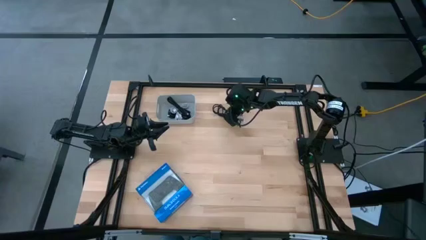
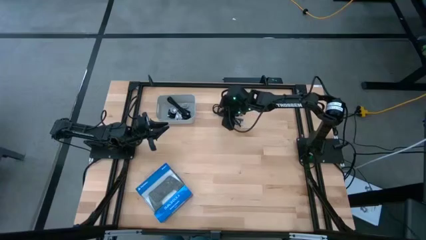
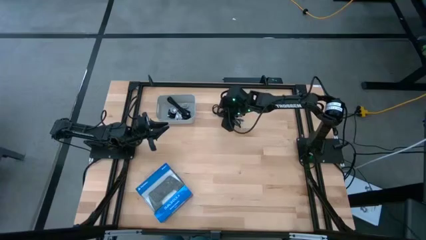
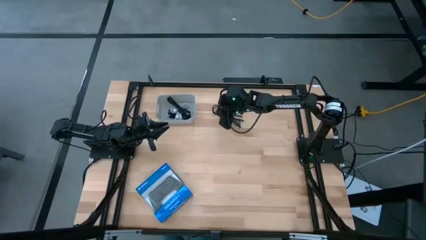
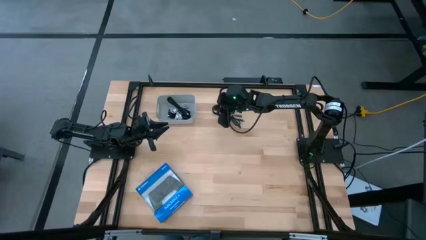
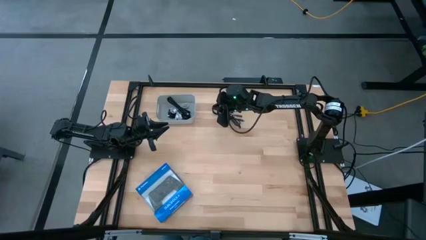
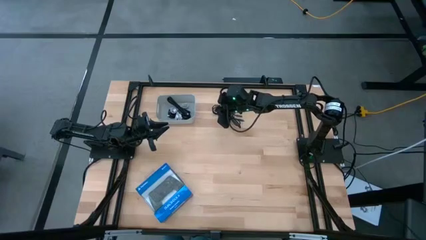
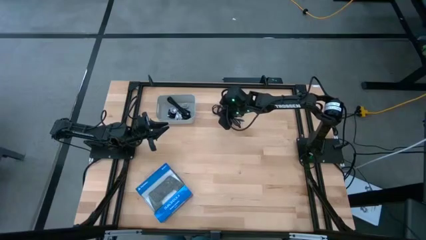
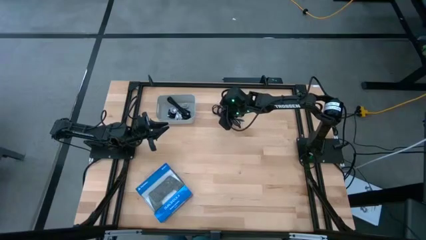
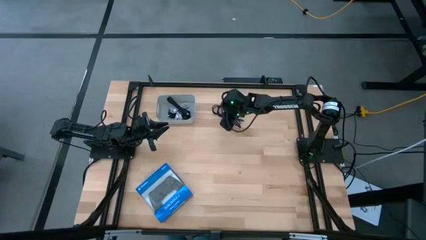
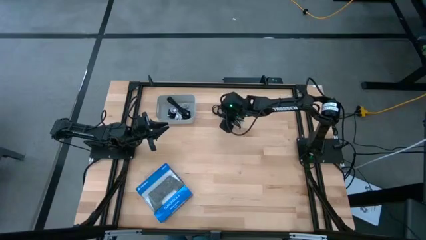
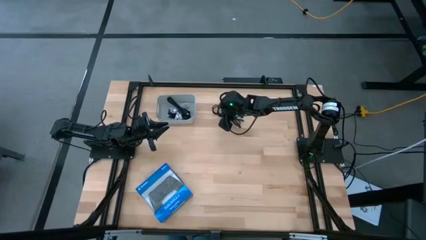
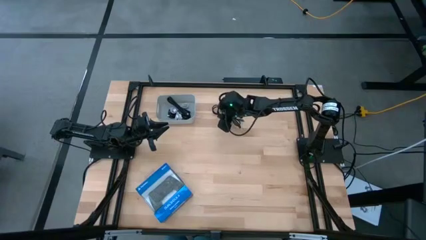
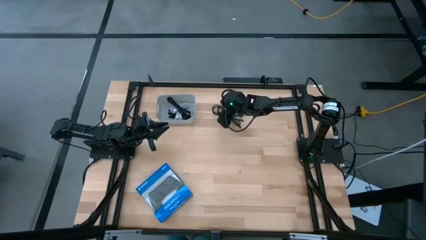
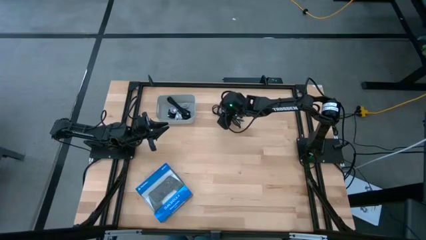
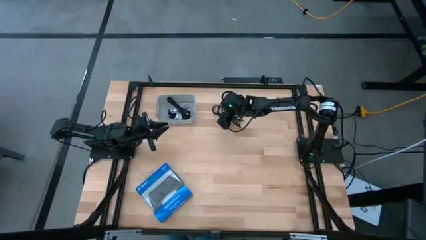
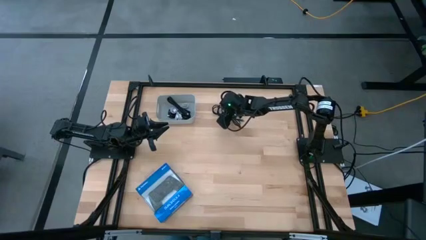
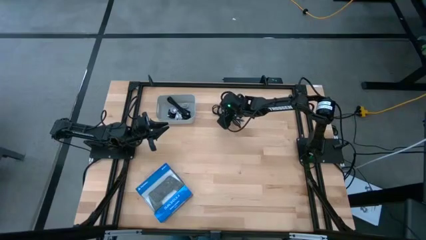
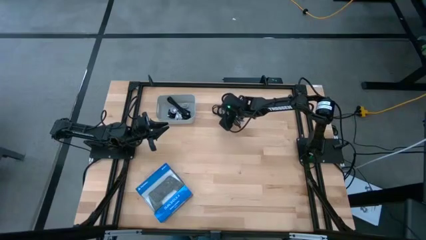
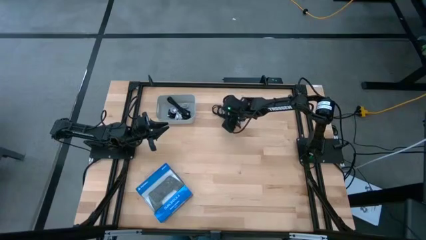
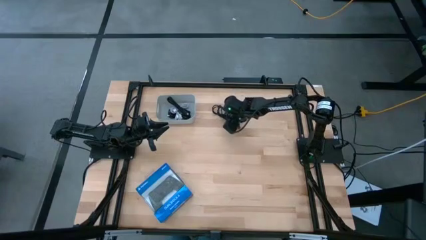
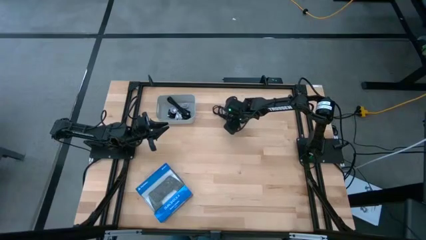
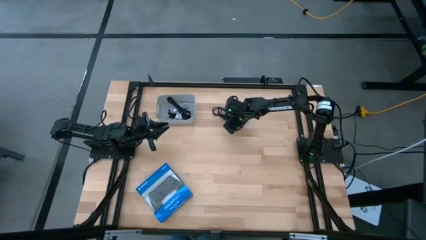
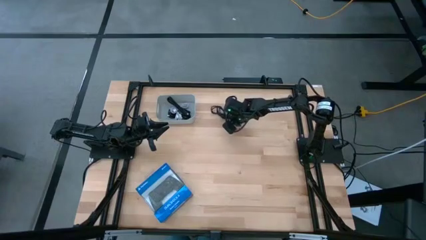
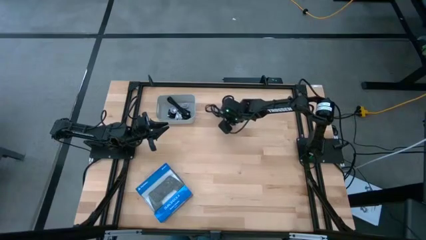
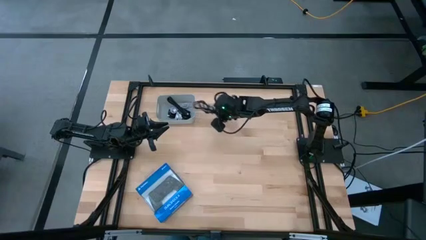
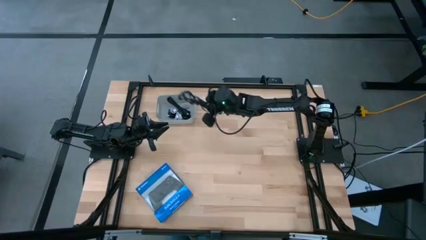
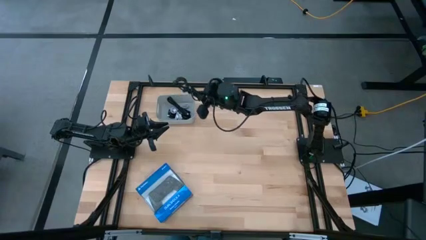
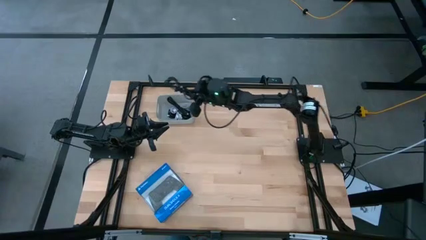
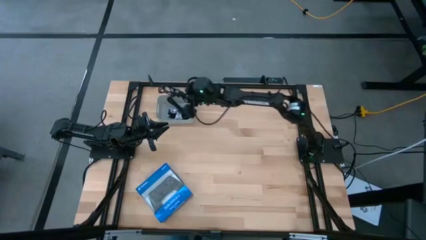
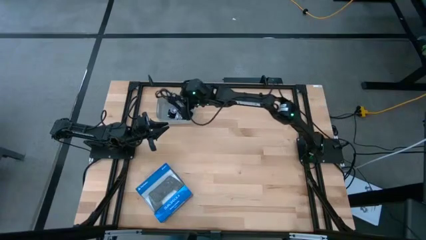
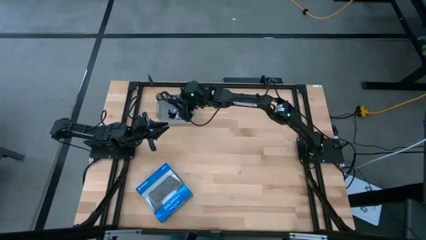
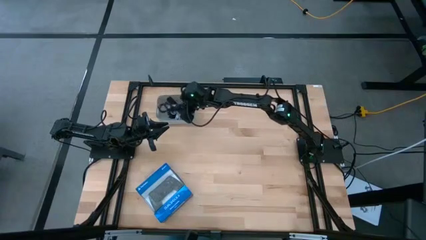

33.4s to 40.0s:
Task: Pick and place USB-C Cables
Put the black gray charger cable into the white bin

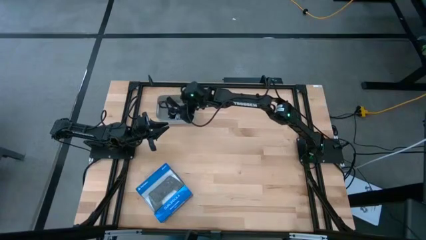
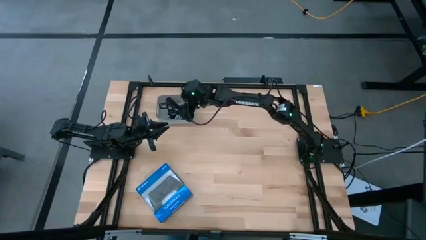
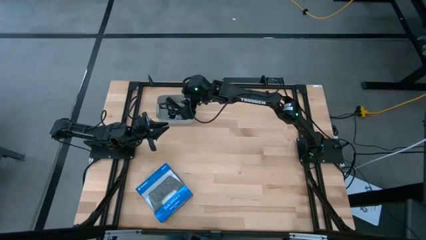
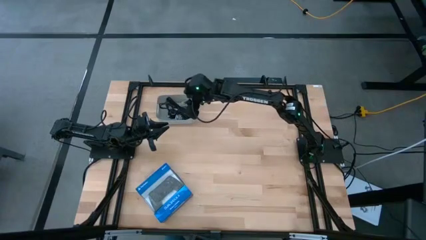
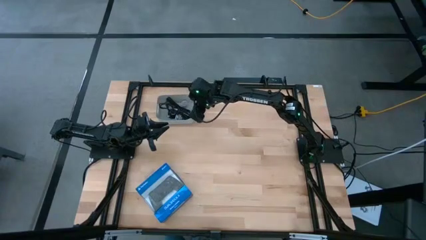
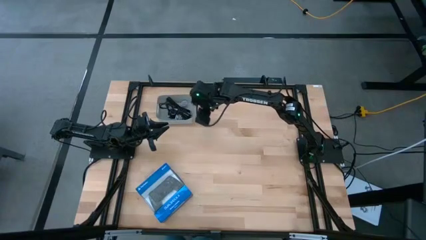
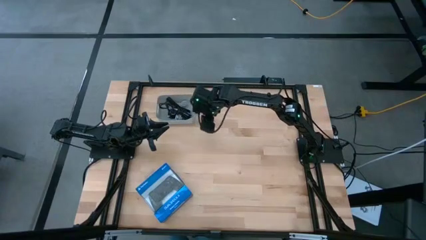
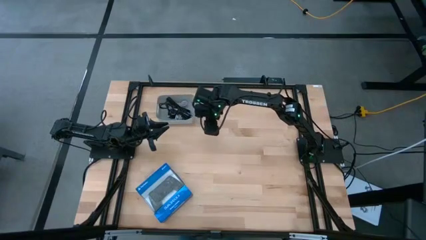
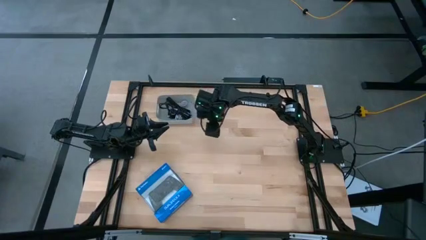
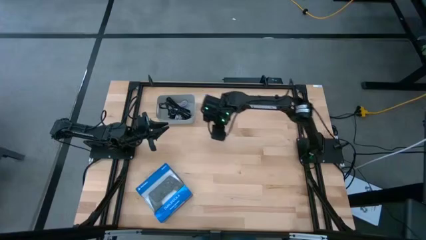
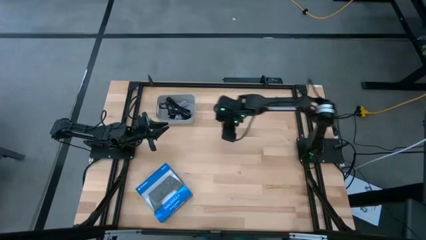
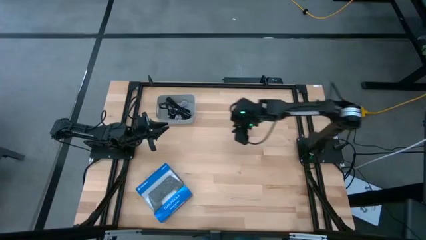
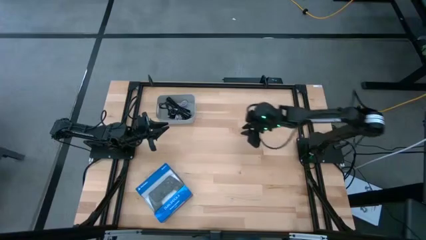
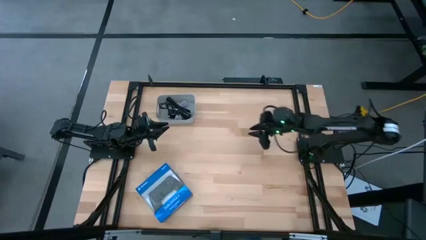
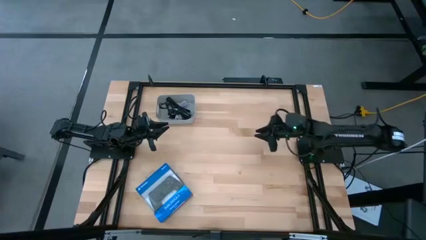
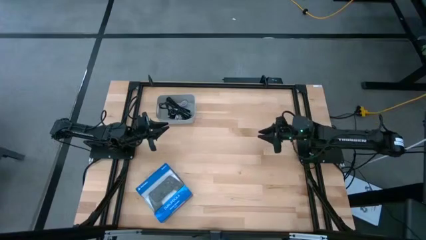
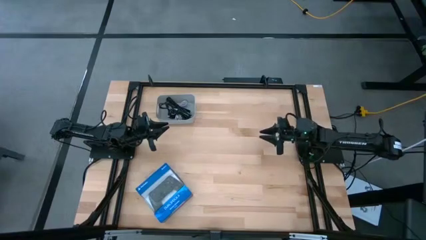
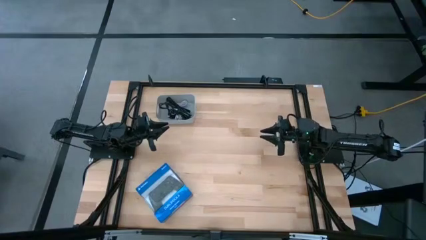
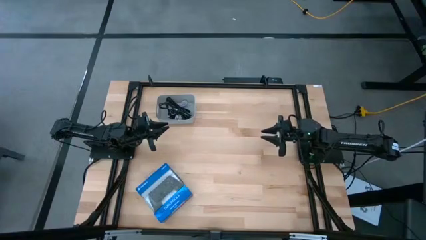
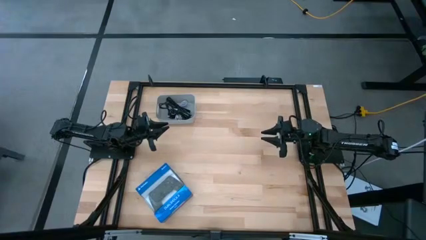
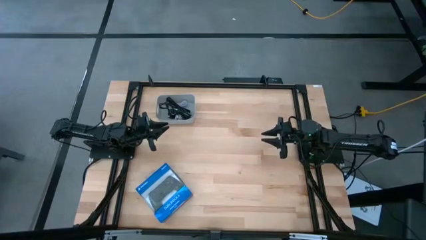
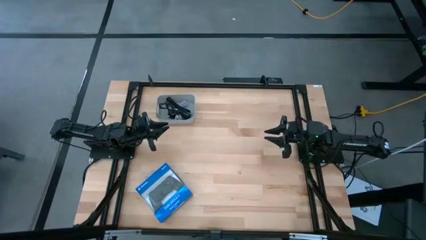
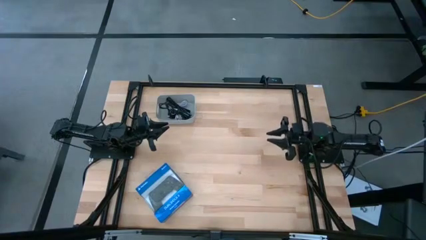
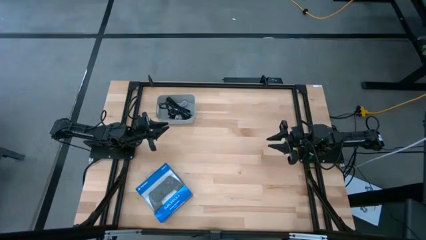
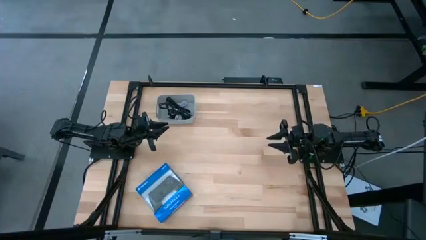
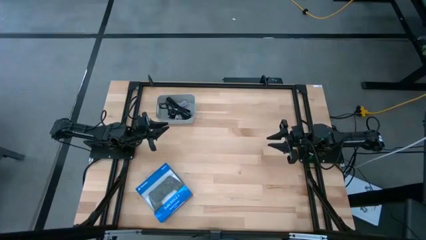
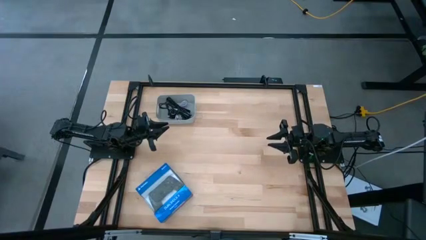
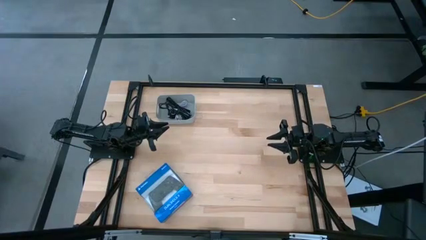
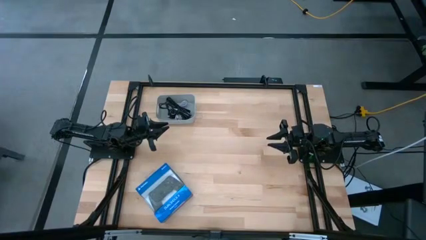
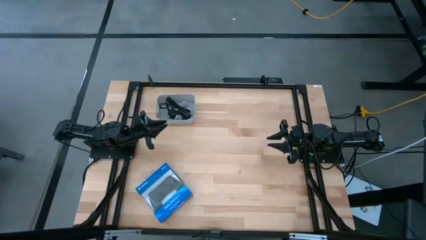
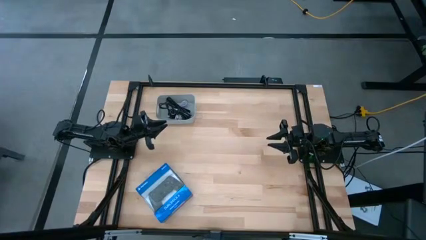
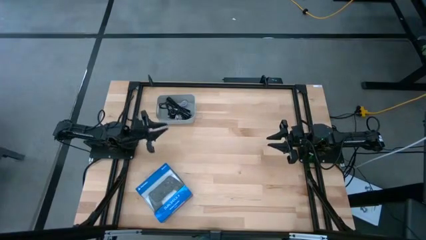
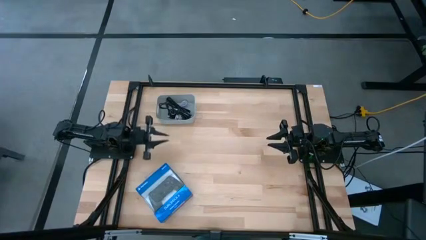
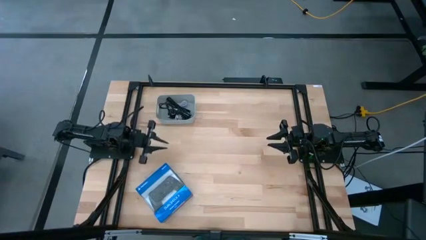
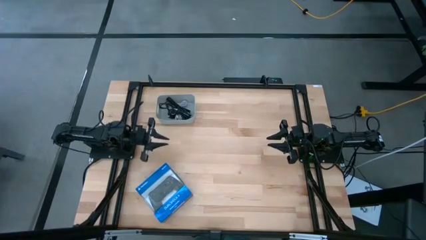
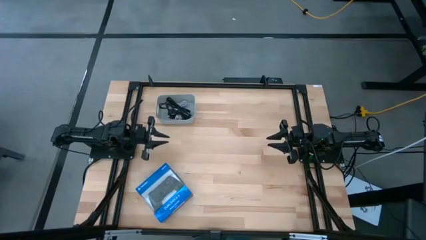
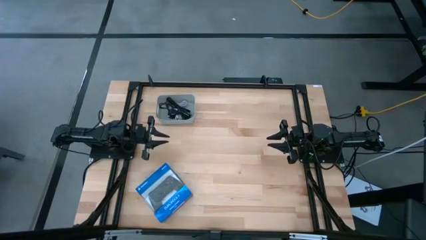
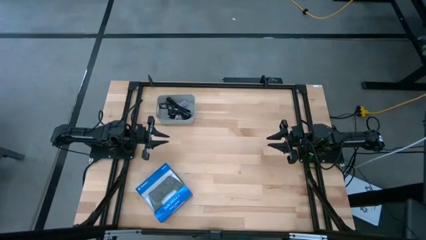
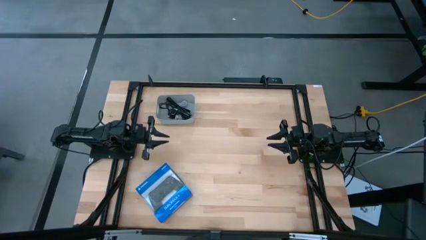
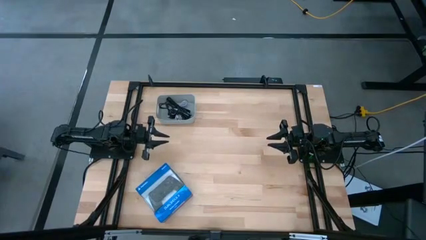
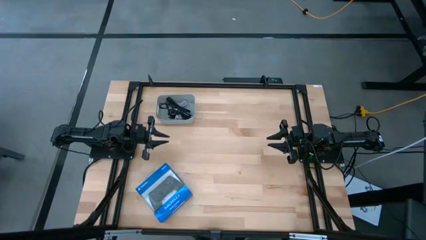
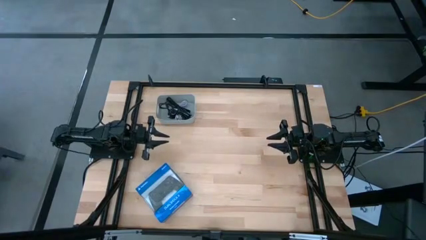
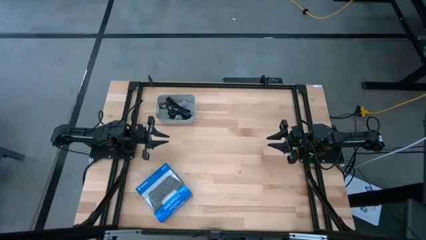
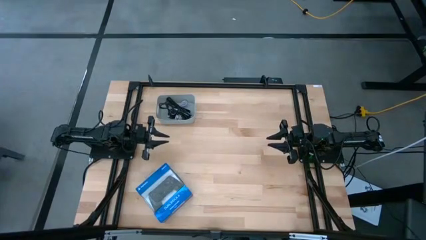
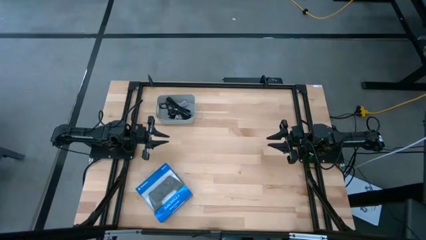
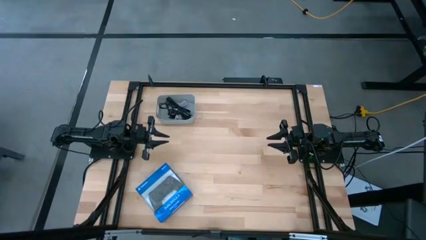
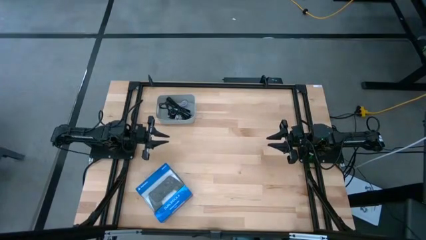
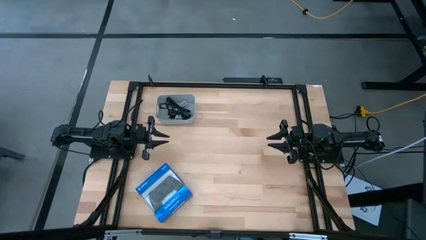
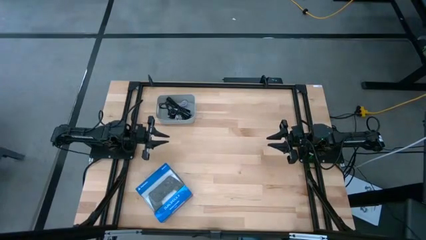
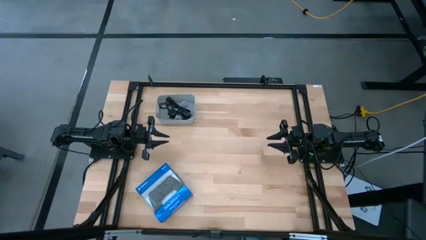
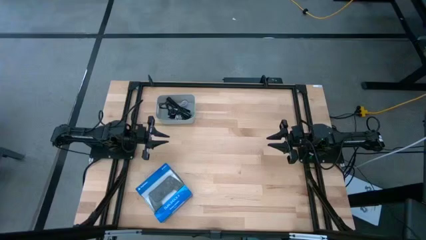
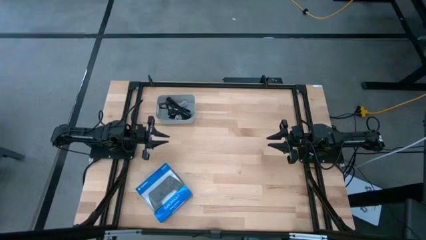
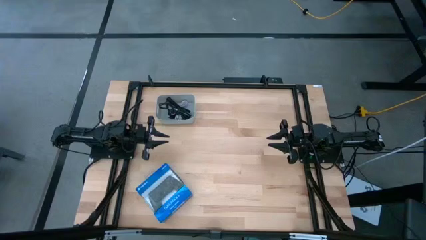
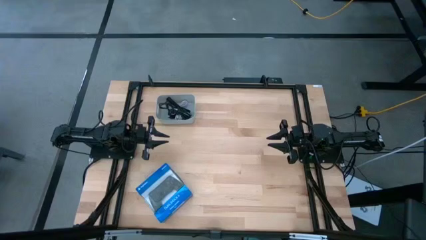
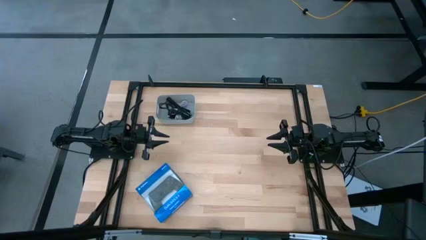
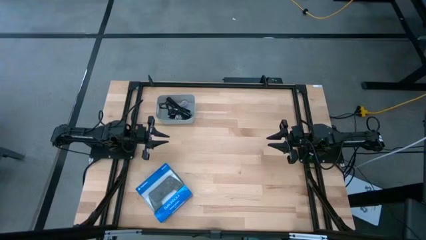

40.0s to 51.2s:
Return to Home Position
